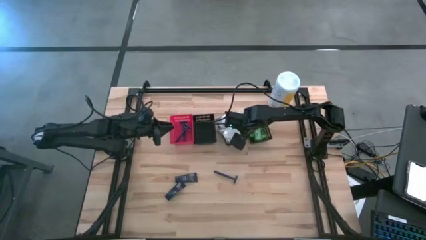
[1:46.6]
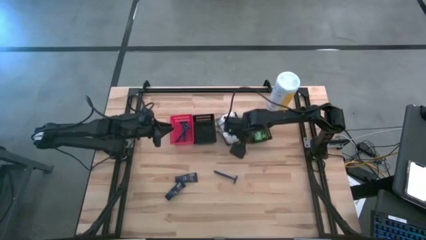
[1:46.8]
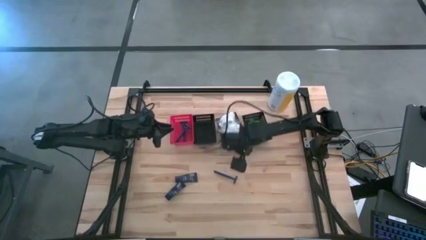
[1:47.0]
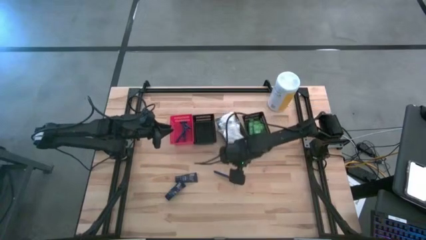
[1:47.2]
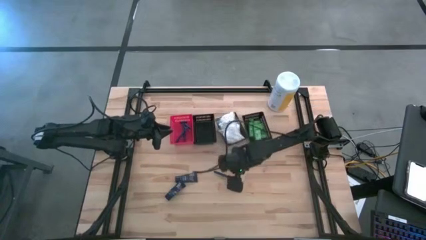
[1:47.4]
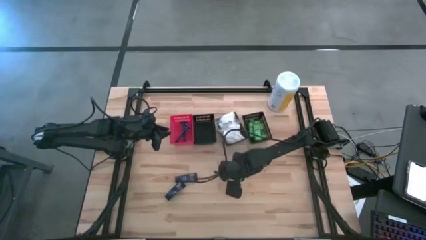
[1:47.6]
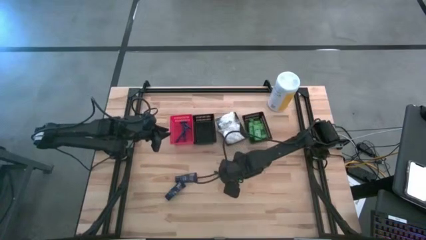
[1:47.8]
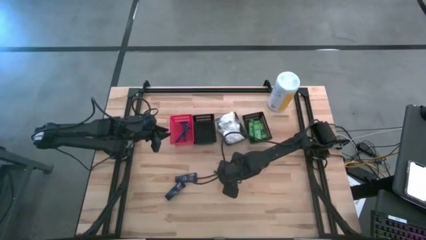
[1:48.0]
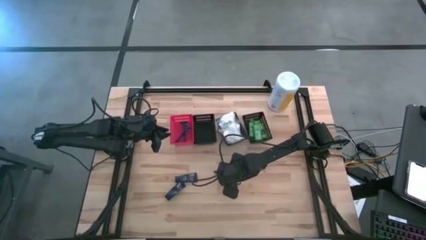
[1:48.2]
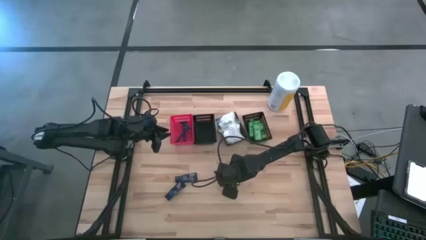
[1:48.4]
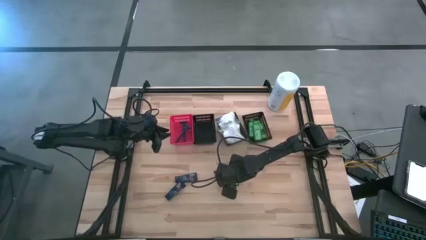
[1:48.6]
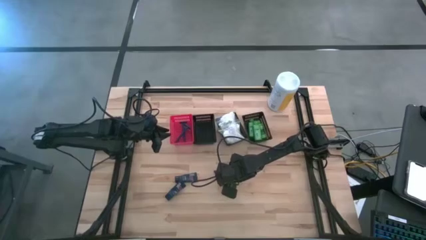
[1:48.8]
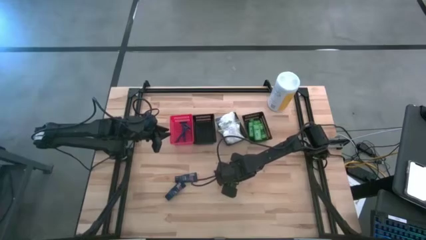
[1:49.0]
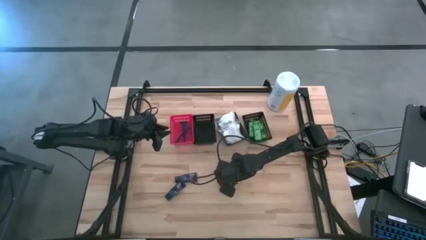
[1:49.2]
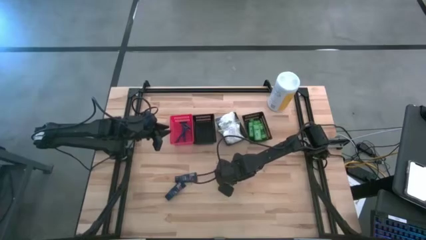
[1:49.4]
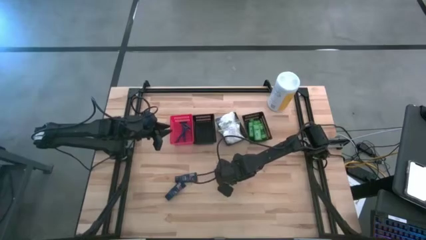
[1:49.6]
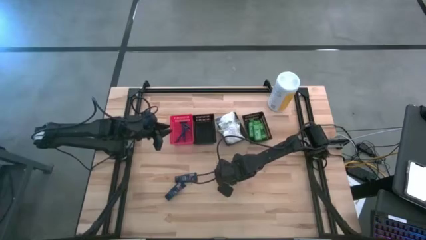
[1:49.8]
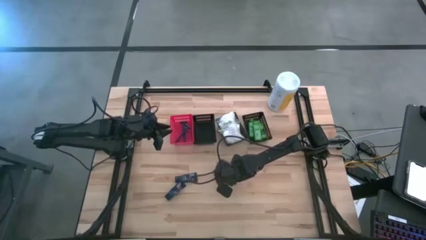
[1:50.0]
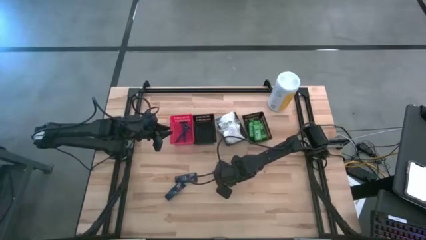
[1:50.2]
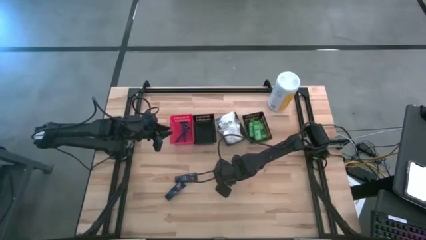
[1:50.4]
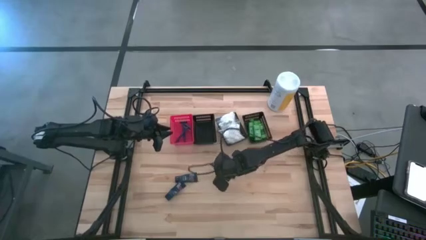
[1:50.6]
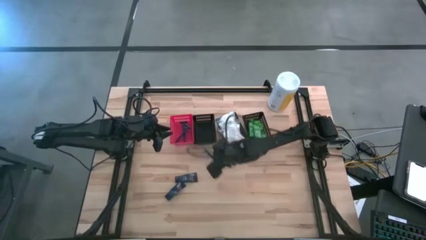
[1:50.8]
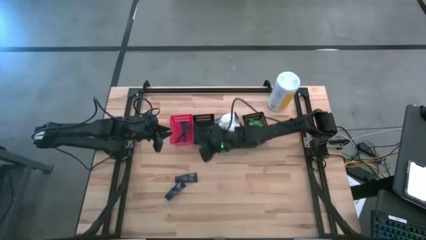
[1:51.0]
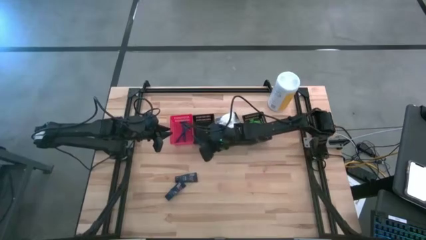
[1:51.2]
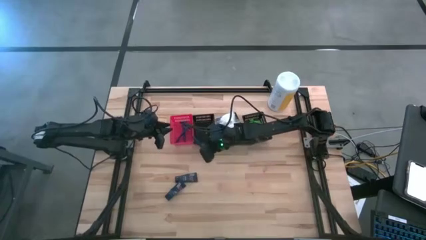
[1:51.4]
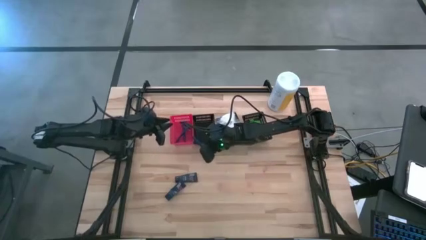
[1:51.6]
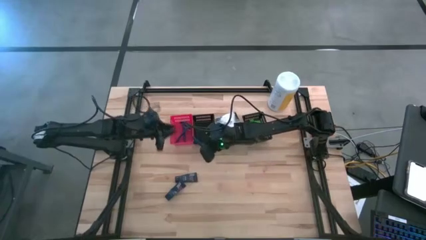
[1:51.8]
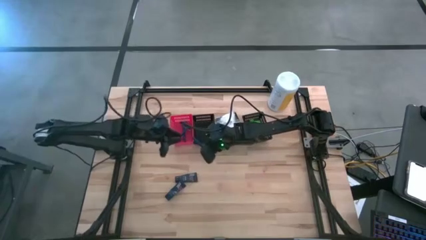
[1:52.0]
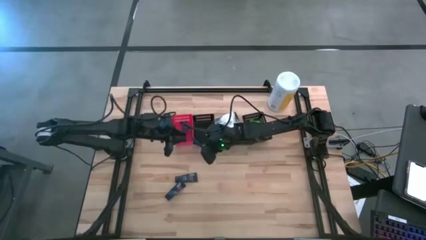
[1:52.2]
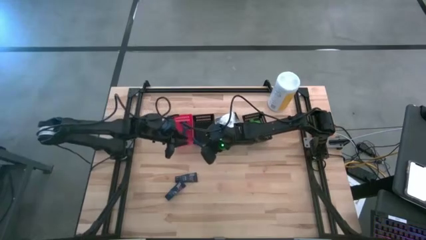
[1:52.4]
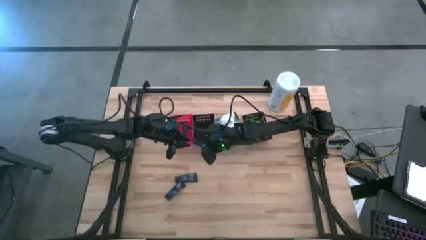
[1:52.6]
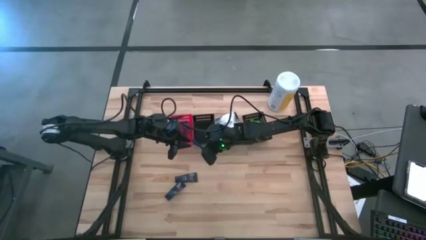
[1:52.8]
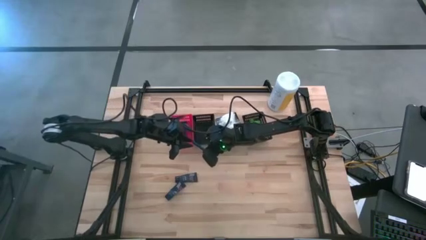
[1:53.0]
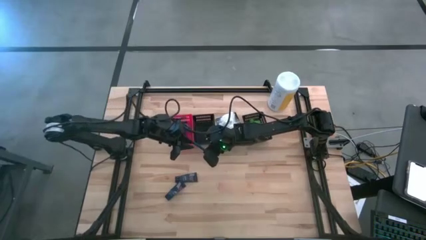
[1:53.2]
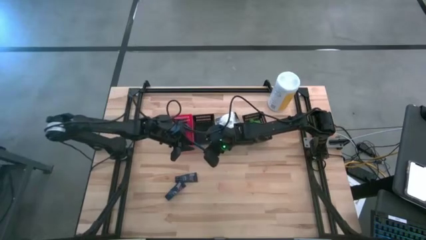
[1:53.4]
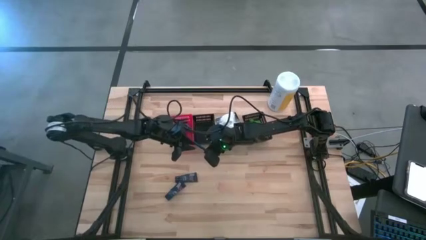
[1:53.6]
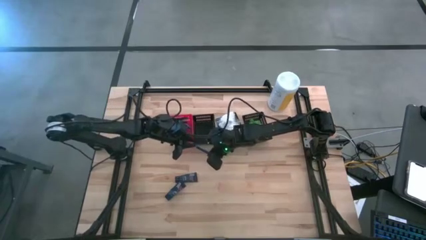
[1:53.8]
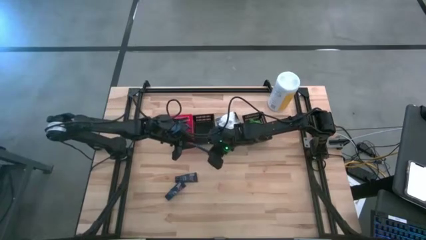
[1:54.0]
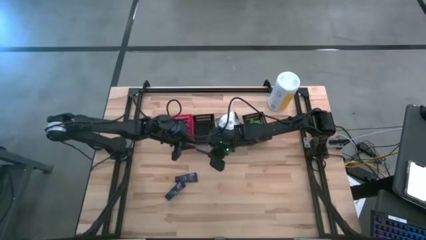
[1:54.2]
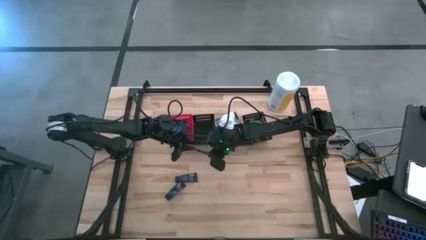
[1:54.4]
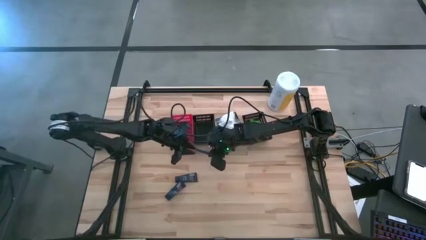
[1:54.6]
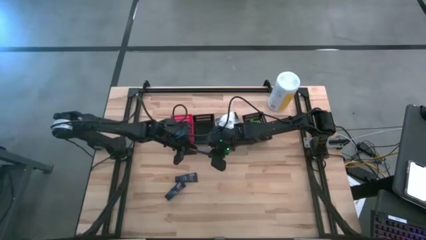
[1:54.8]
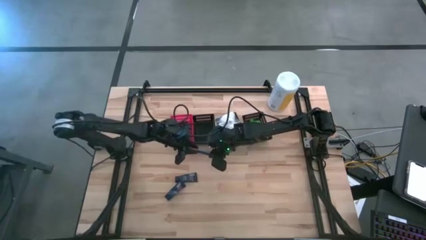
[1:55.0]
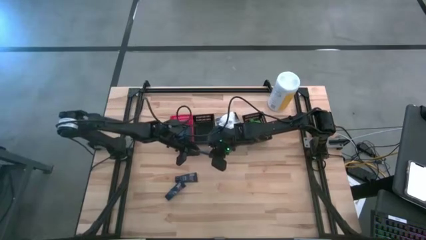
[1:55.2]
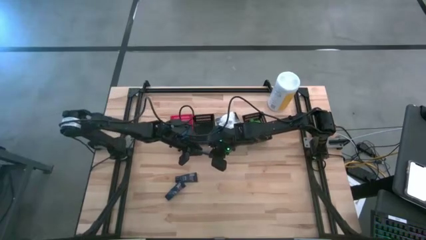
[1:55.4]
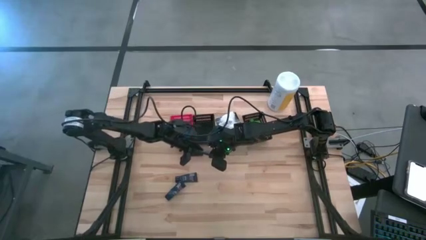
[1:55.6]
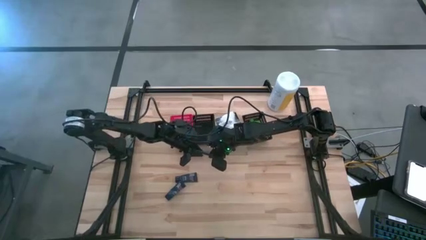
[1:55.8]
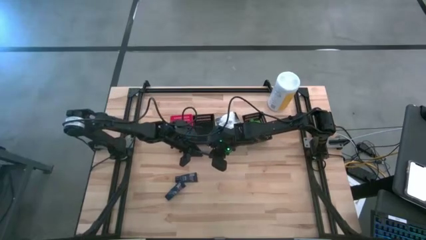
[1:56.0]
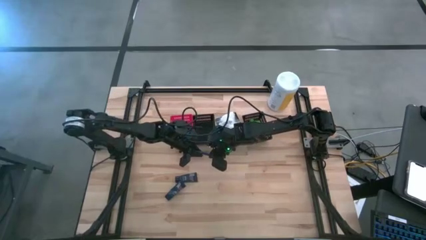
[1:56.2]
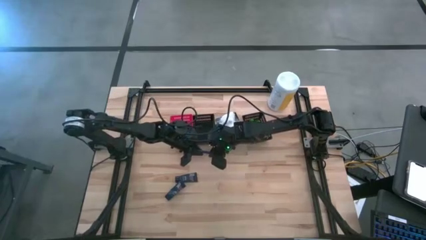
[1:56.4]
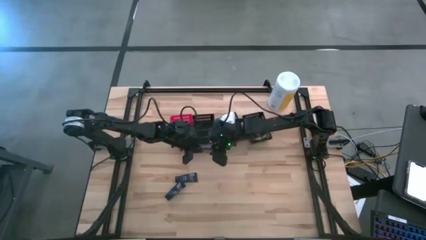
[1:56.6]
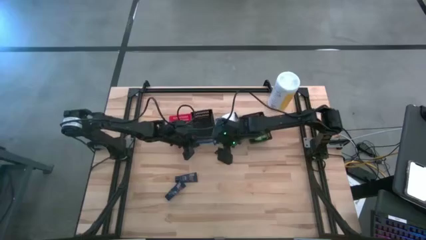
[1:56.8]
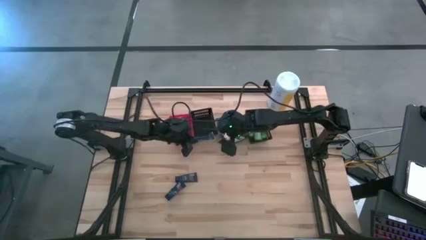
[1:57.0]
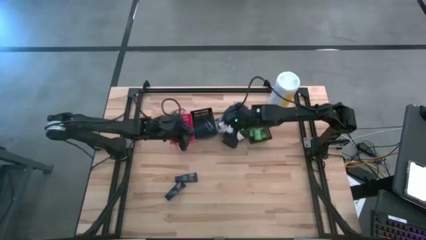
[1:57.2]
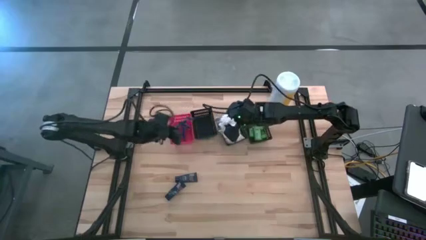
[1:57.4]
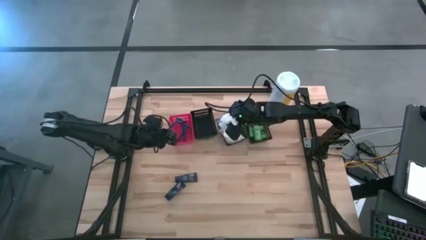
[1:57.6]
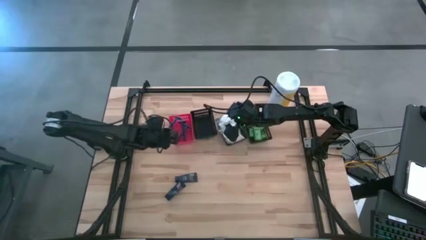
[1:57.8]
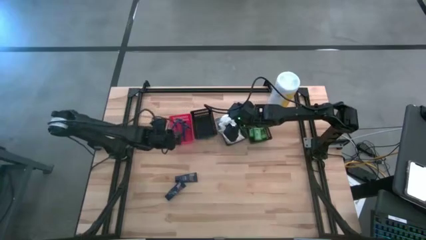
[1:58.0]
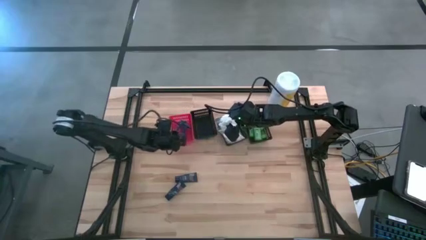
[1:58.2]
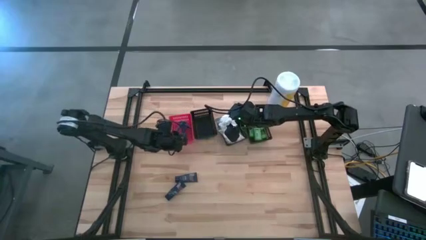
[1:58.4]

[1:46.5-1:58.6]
Task: Pick & Place Travel size toiletries
Put the razor into the red bin

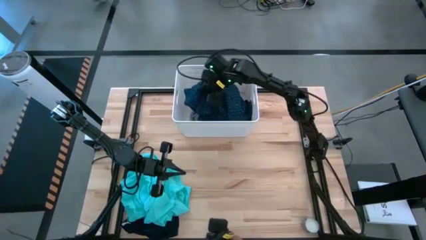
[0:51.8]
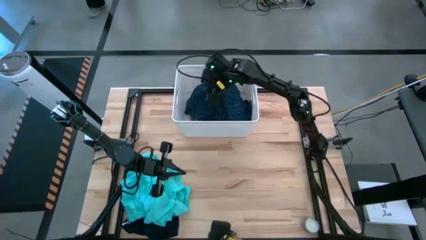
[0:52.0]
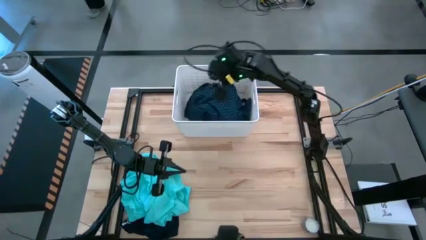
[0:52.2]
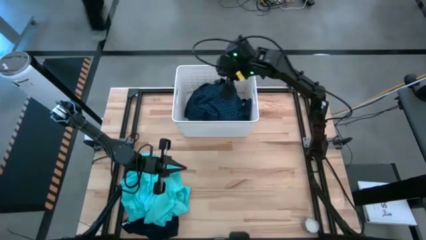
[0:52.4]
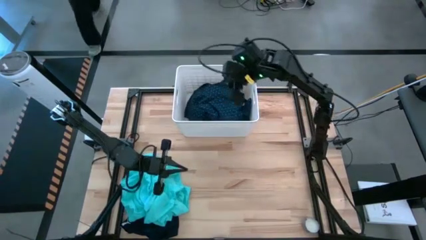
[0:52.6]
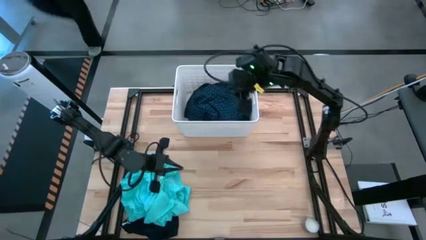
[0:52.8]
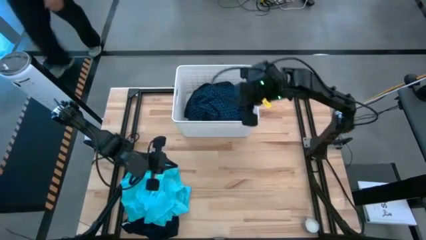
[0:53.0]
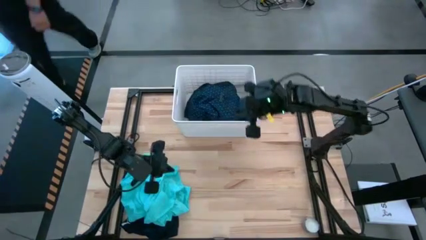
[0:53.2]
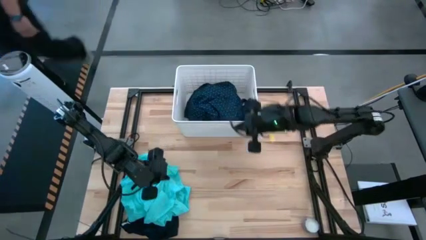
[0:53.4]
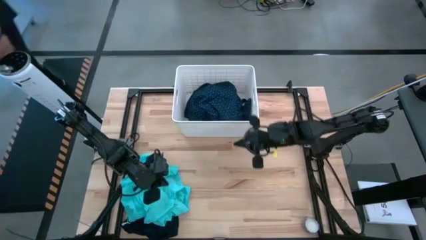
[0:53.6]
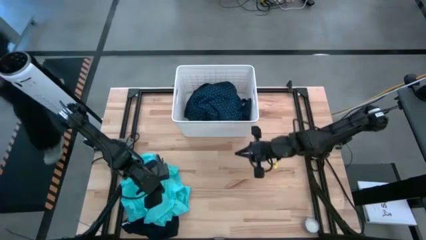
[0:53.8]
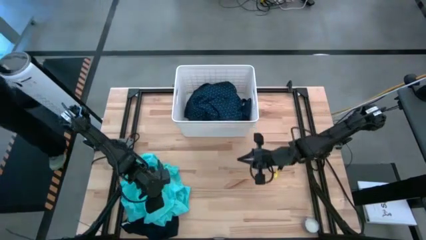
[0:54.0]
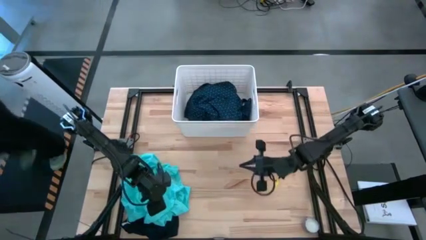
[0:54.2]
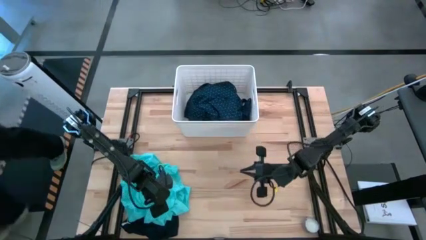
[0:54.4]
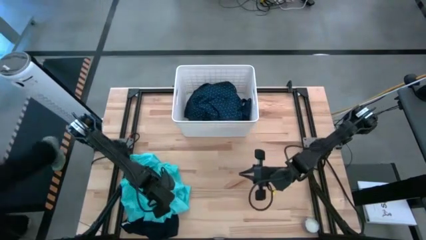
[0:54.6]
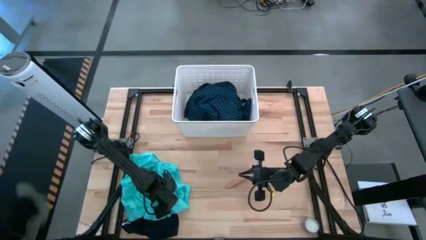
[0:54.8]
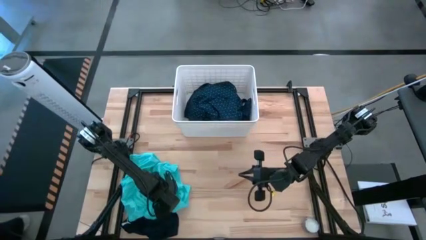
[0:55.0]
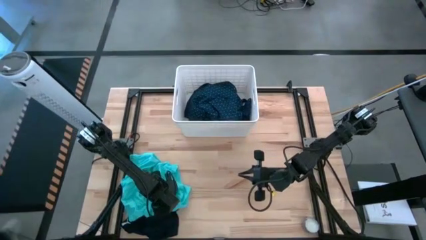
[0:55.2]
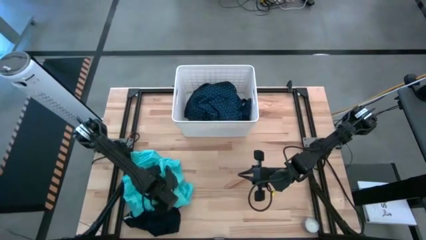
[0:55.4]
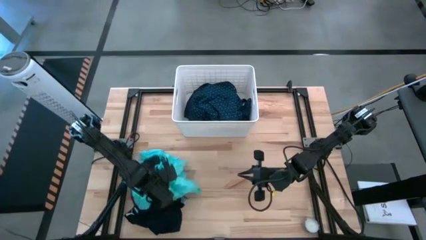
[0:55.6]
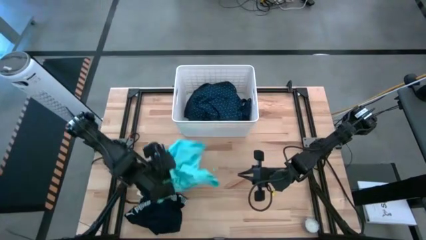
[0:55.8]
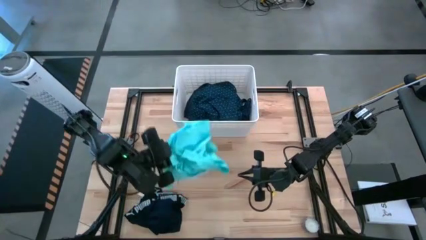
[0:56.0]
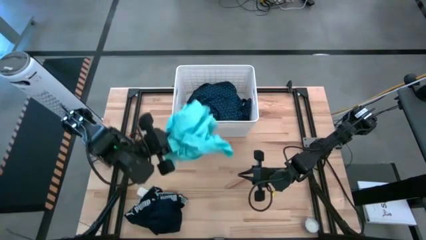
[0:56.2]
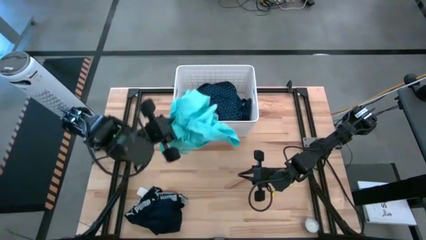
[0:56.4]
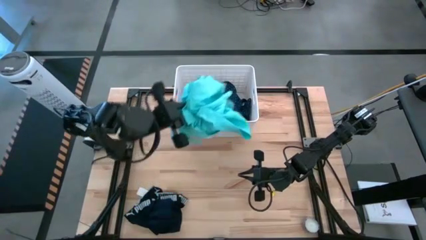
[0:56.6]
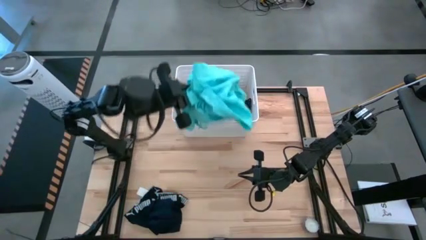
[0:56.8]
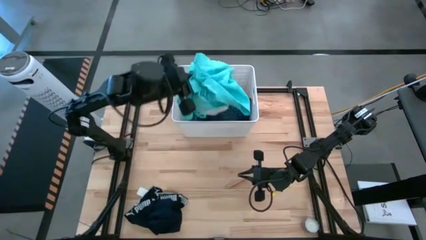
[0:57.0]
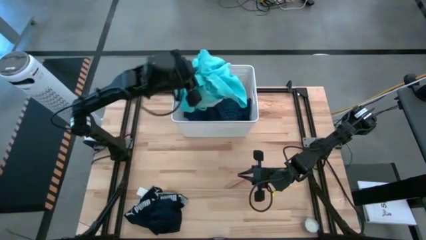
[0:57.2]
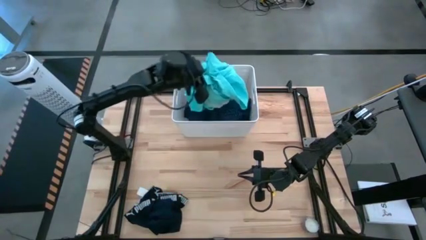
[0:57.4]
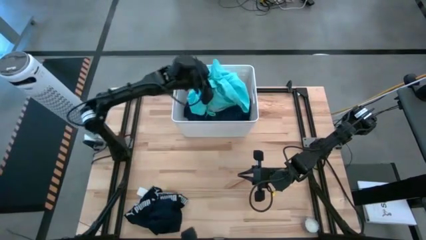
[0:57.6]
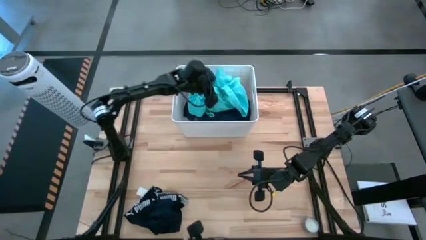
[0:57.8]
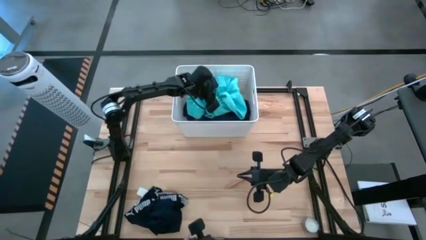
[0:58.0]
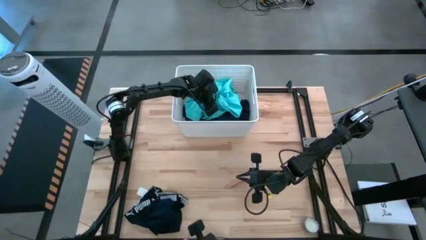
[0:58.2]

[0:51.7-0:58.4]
Task: Sort clothes
Put the light blue shorts into the white laundry bin
